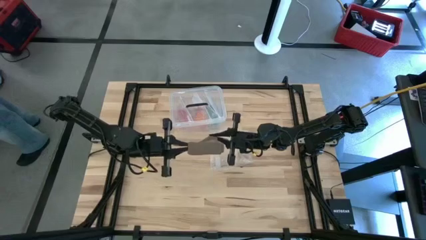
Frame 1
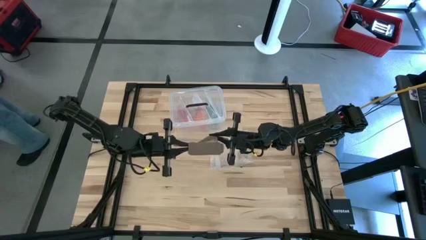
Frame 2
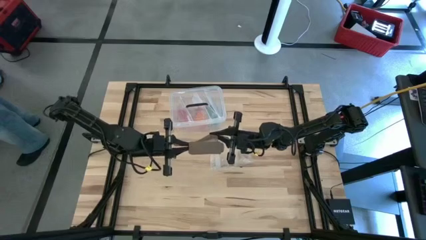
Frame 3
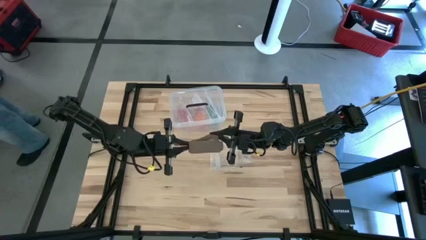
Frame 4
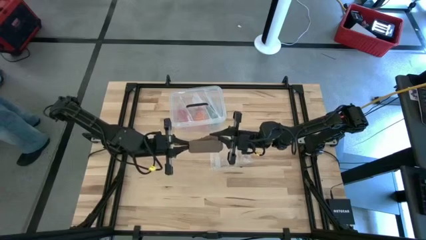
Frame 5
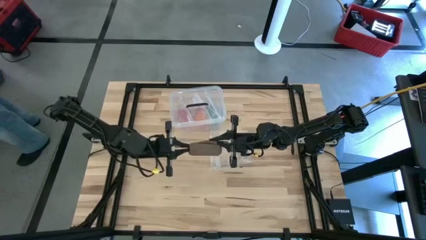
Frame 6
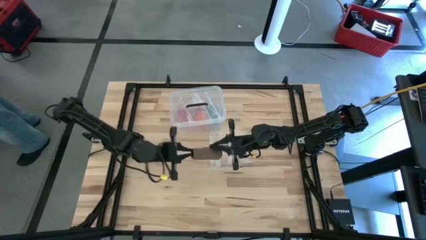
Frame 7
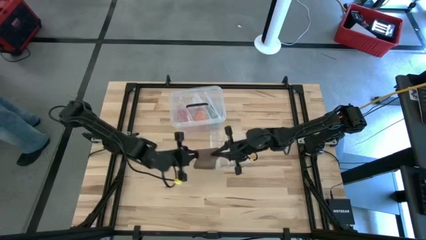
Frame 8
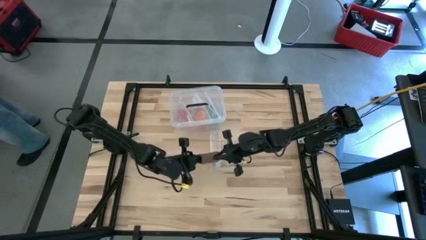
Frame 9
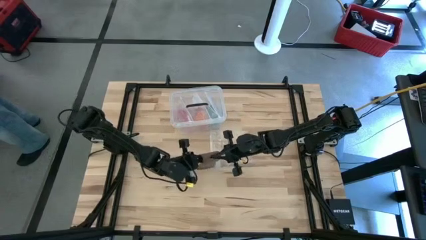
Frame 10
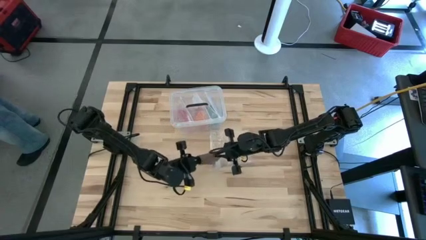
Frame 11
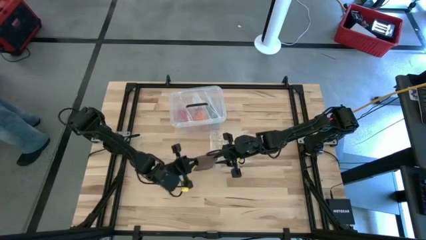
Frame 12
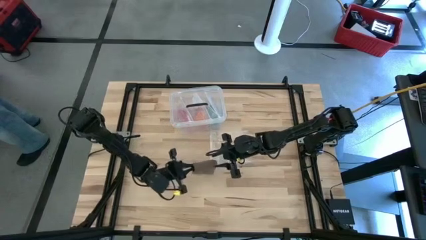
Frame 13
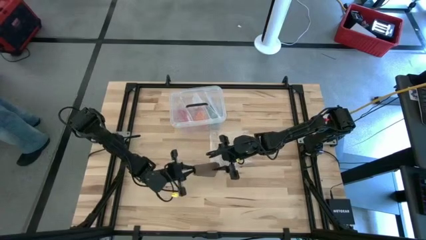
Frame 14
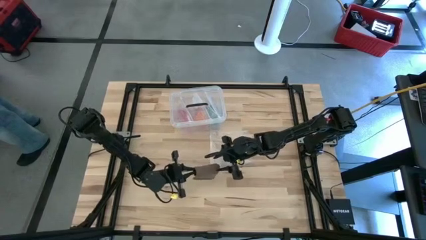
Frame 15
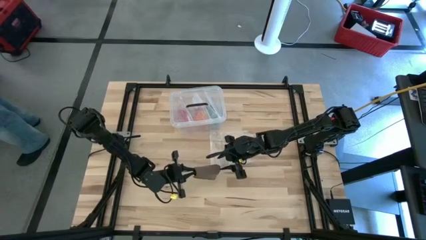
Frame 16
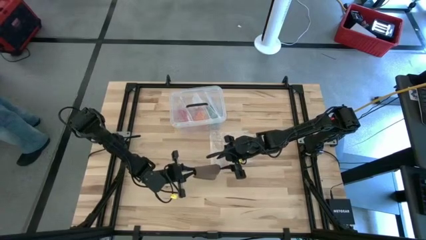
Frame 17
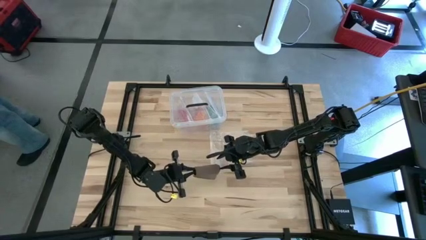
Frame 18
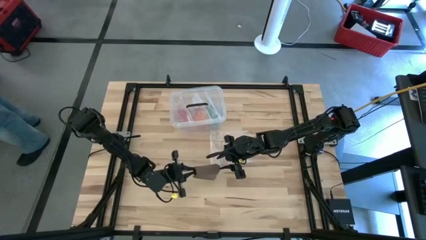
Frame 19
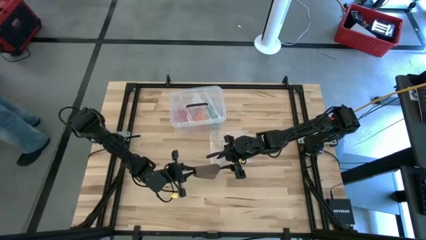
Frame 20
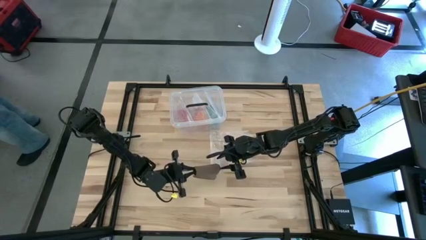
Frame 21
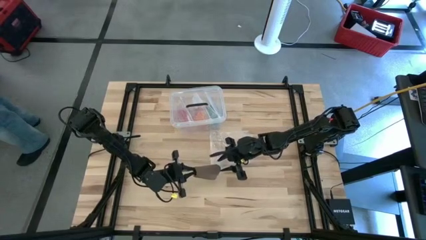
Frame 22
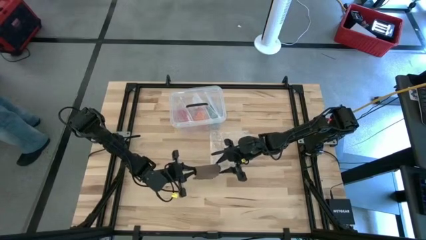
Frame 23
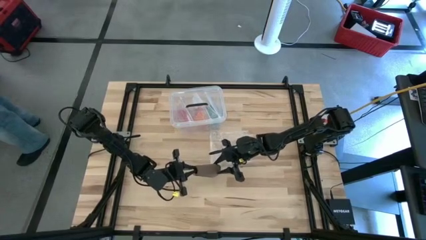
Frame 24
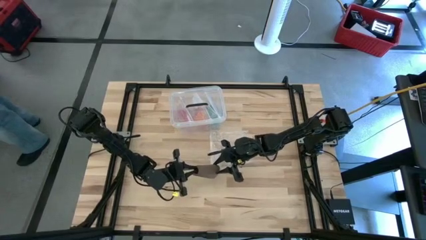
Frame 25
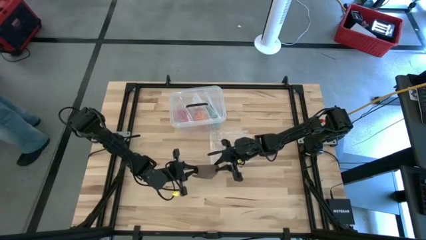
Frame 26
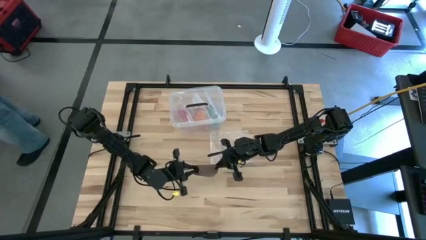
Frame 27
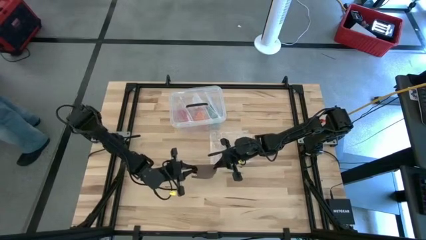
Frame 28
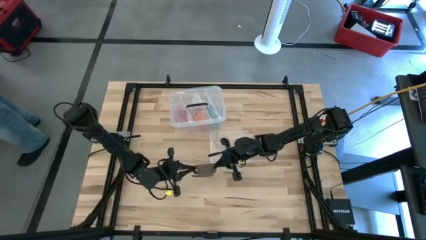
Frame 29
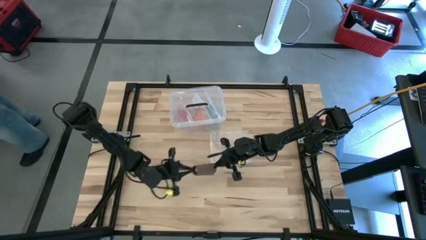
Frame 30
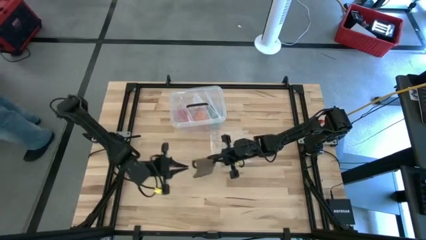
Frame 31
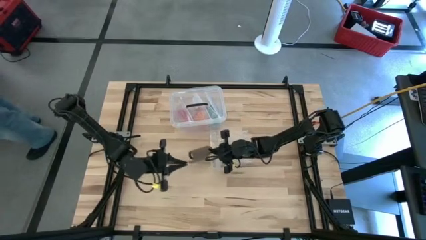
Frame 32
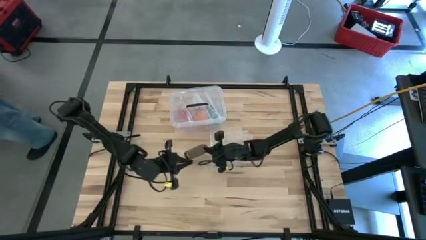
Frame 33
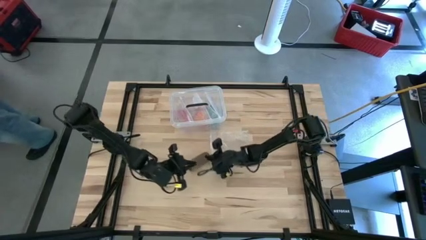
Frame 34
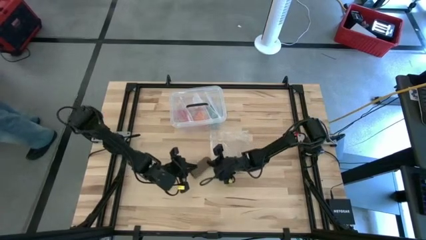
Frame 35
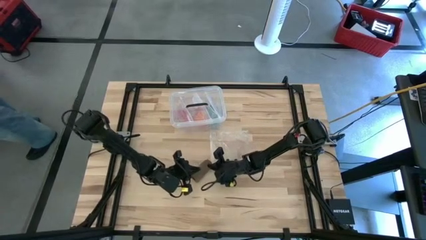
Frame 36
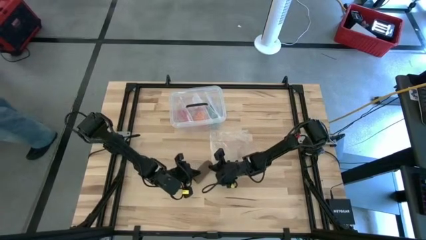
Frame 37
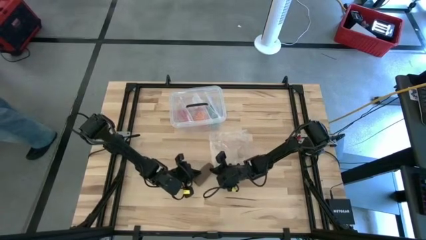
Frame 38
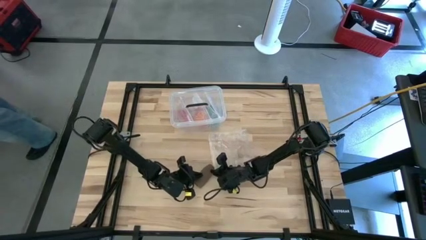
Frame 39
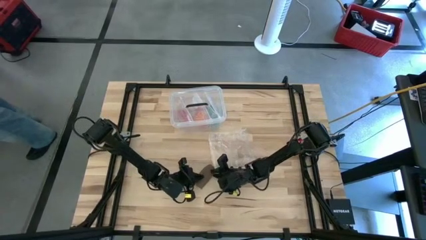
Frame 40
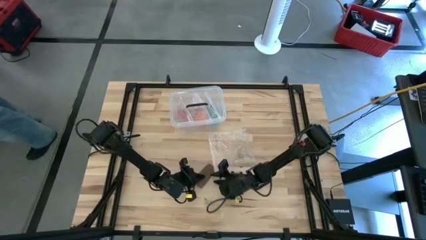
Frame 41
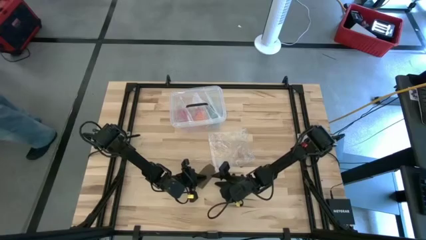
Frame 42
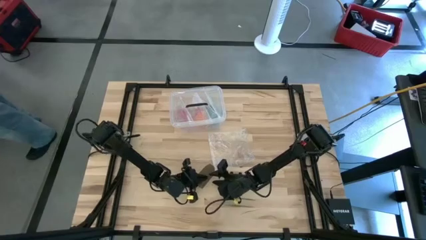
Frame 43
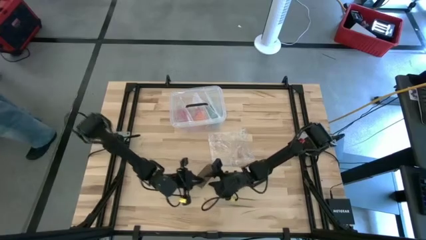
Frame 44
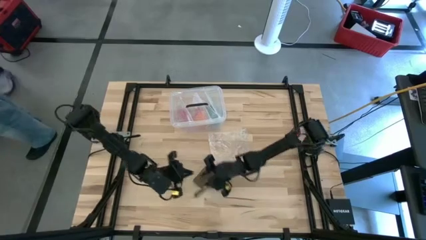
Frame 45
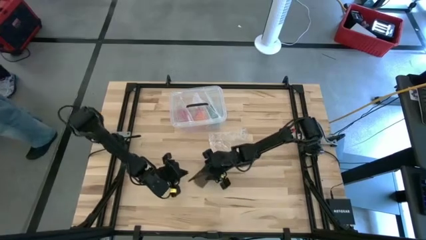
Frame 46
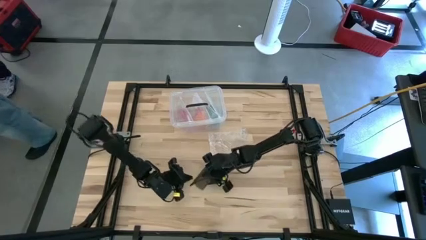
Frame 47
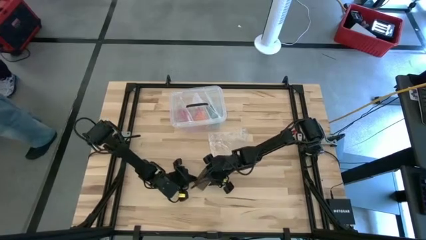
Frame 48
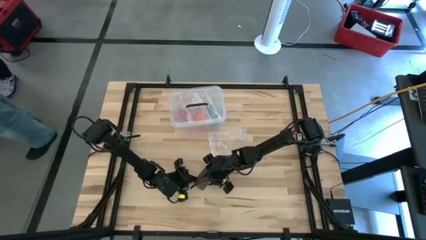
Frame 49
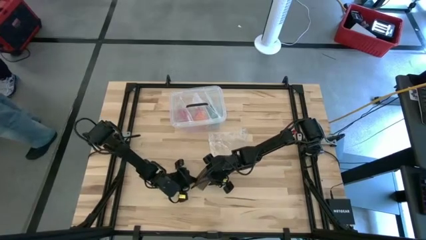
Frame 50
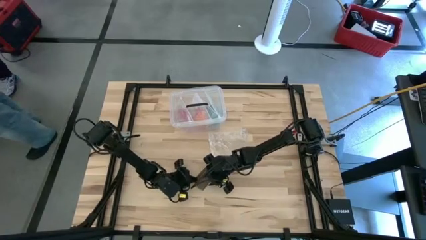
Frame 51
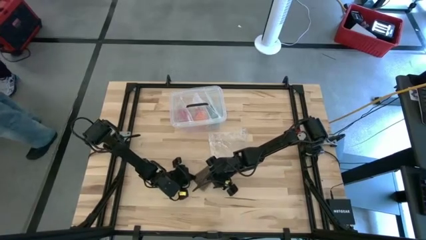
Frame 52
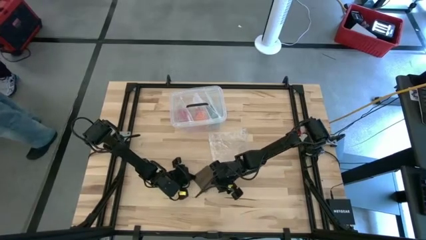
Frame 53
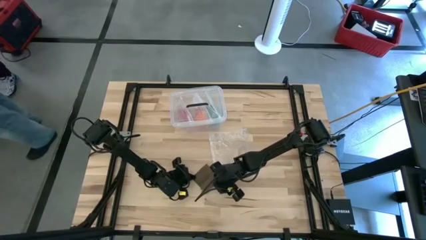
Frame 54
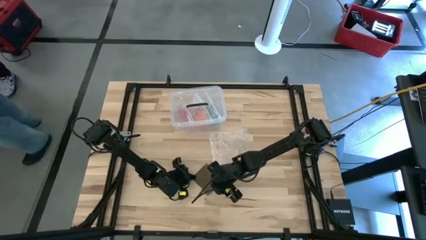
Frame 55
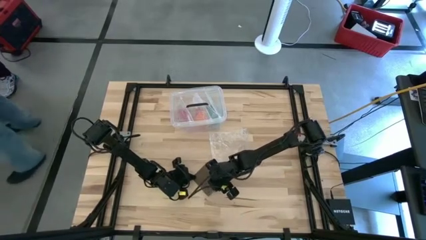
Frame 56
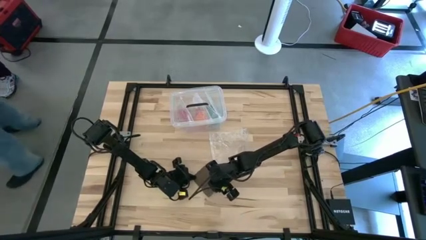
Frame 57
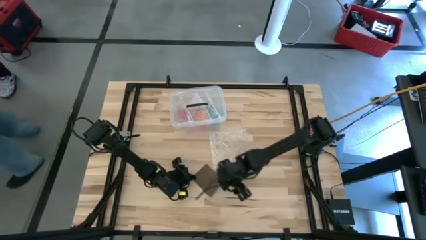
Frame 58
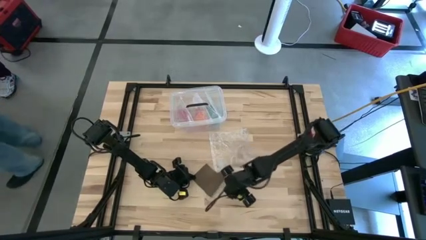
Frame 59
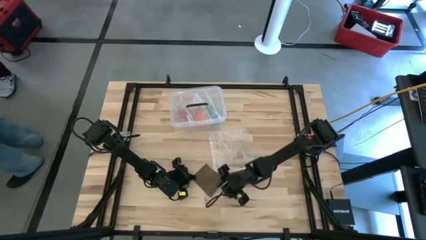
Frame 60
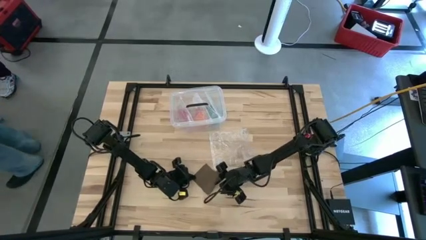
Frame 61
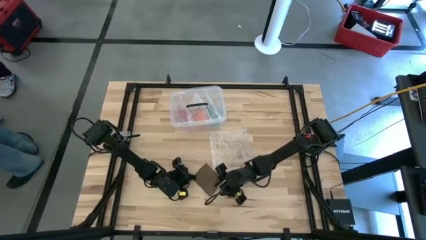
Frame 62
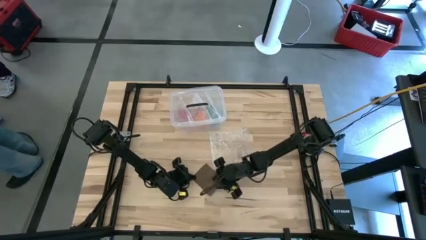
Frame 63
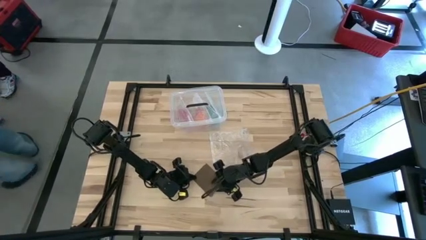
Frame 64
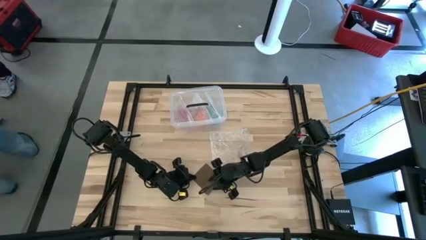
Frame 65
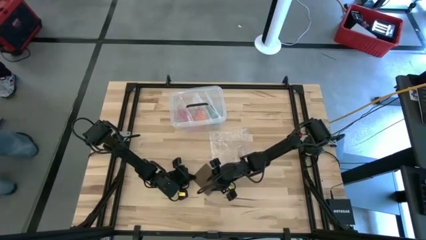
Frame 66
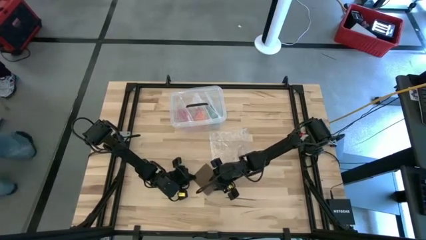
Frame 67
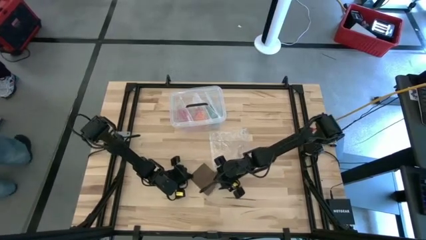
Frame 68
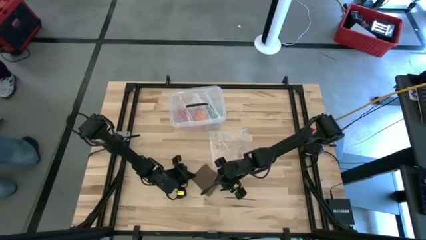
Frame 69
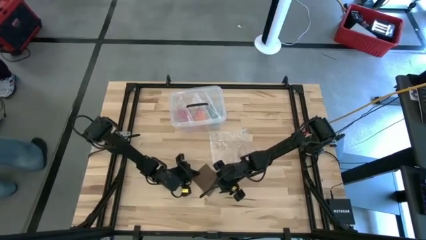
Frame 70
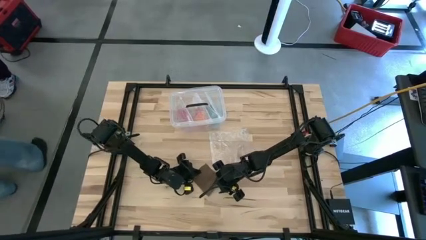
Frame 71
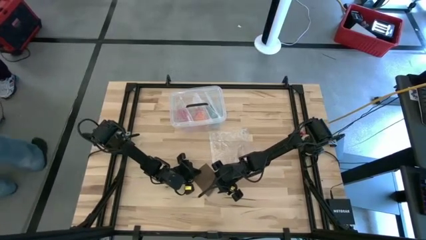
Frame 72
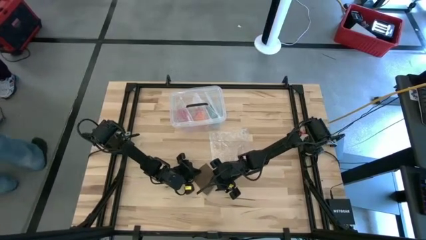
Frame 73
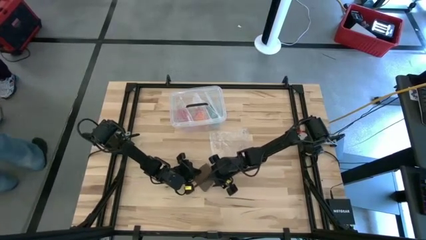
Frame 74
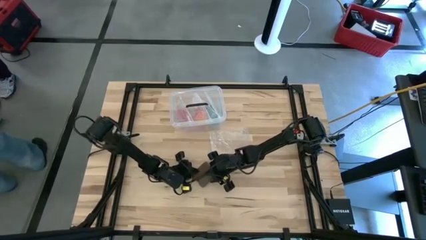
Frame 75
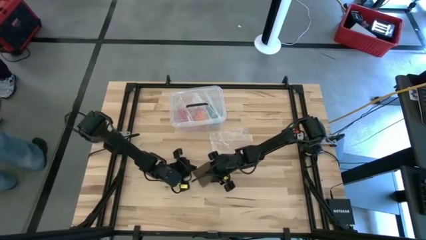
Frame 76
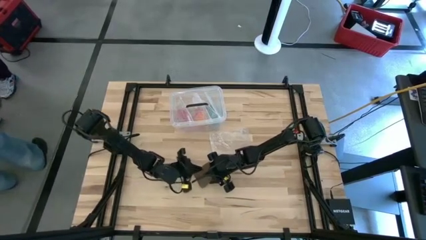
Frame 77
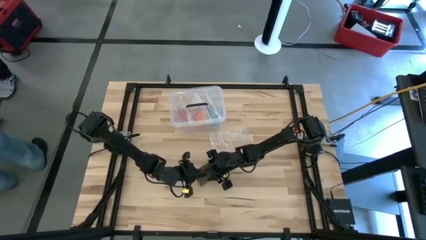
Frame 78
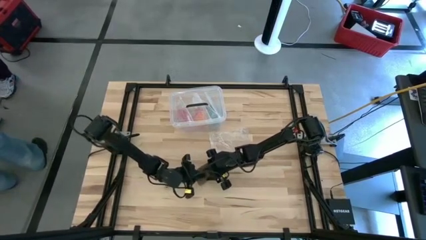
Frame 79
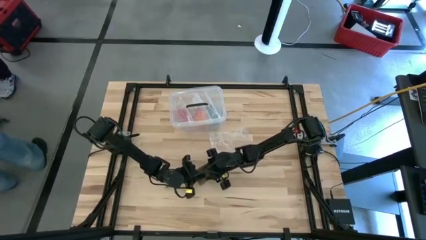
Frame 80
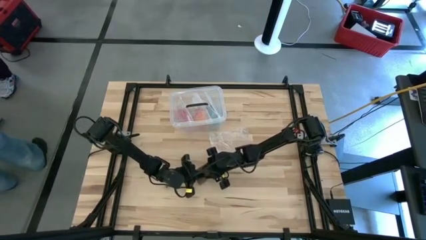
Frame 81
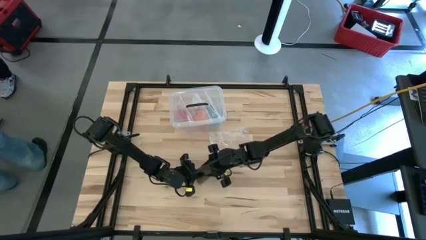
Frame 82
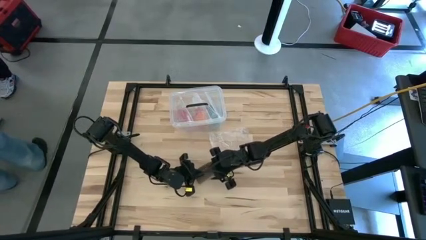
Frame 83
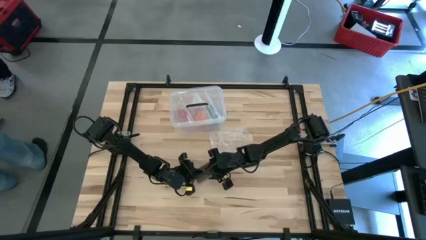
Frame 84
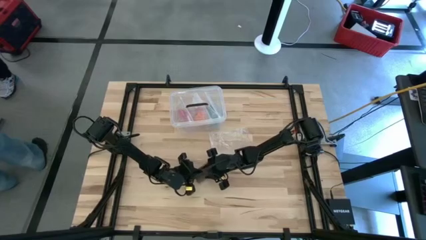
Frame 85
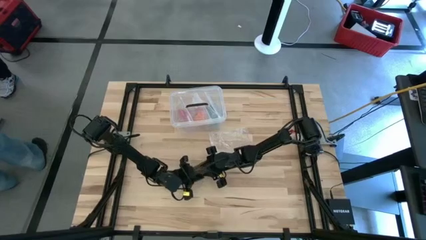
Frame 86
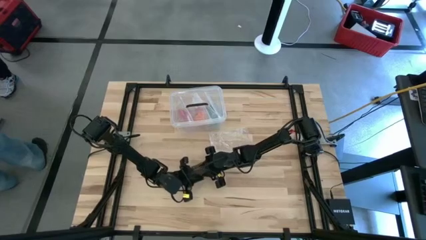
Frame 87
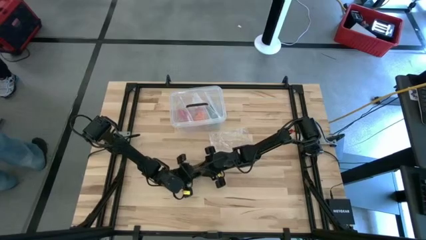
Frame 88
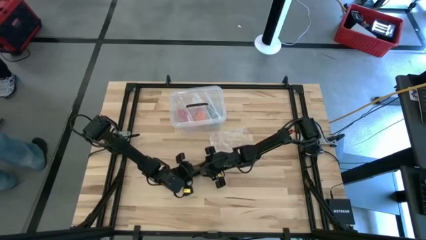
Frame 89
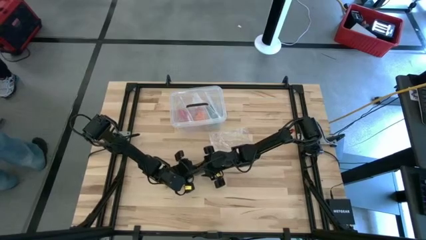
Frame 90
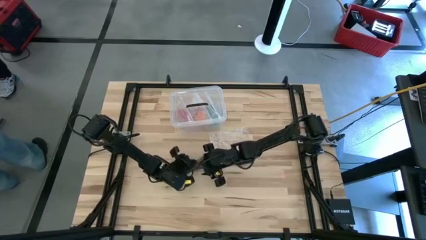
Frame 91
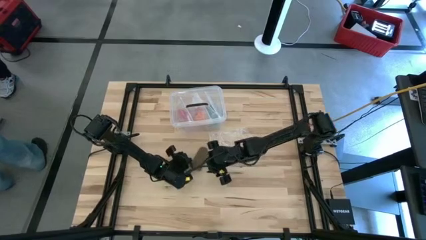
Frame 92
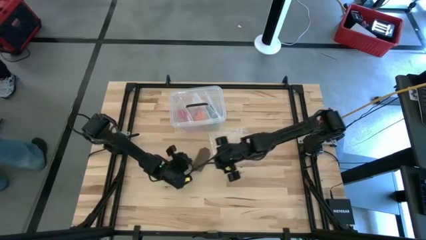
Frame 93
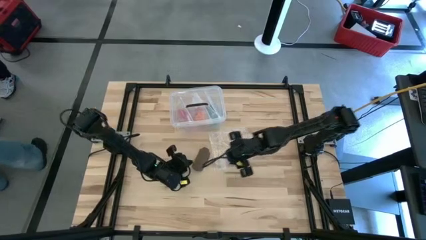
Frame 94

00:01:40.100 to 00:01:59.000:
Task: Roll bandage
Roll the brown bandage
